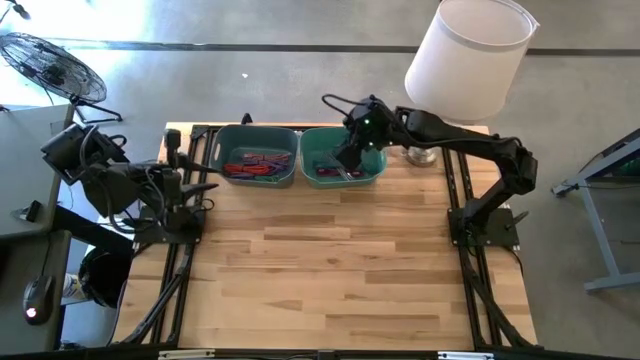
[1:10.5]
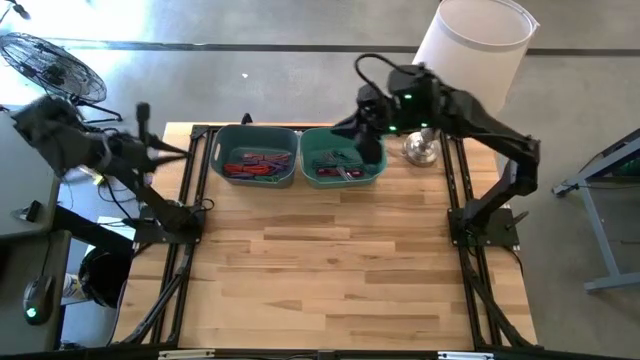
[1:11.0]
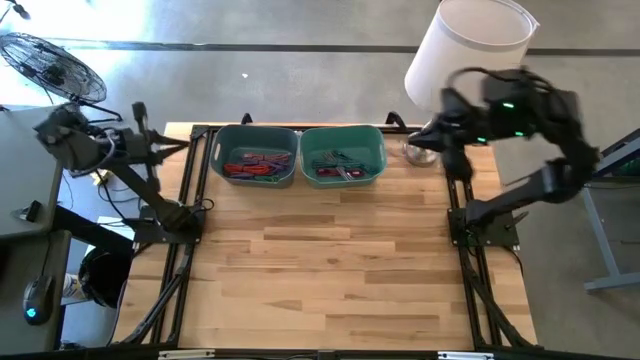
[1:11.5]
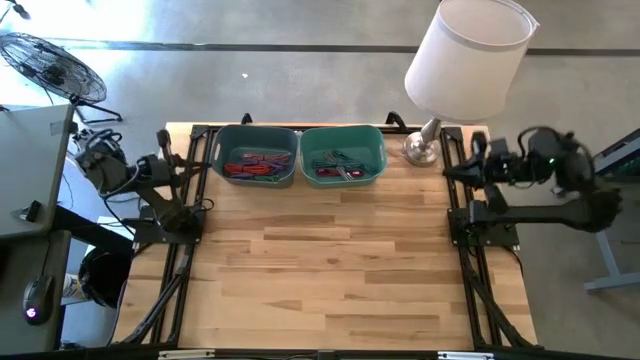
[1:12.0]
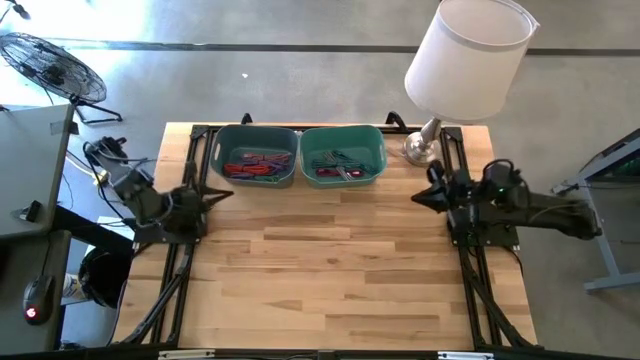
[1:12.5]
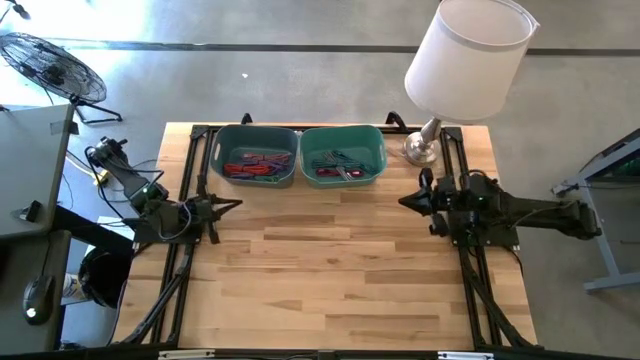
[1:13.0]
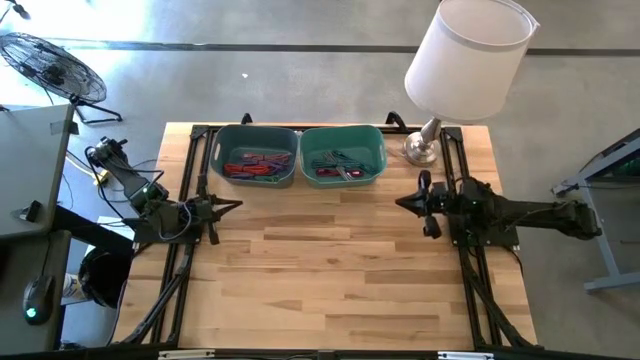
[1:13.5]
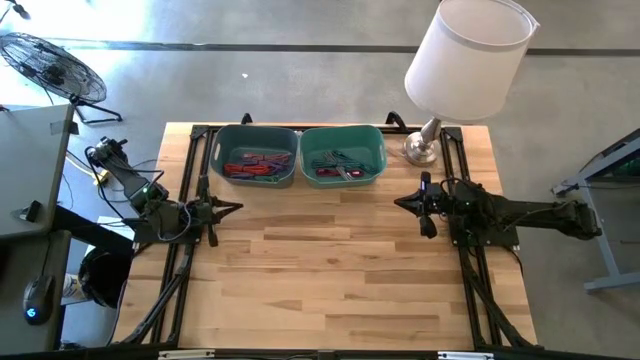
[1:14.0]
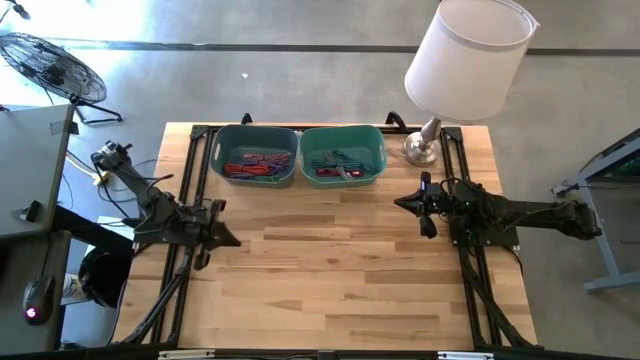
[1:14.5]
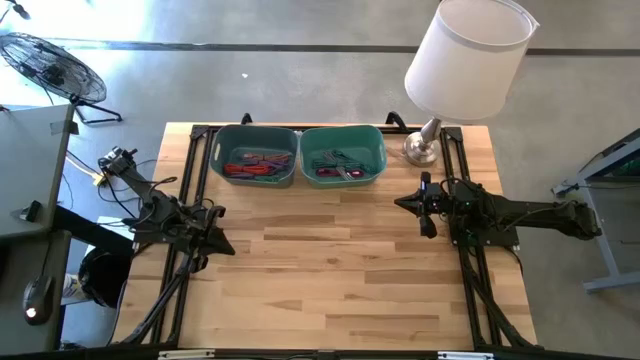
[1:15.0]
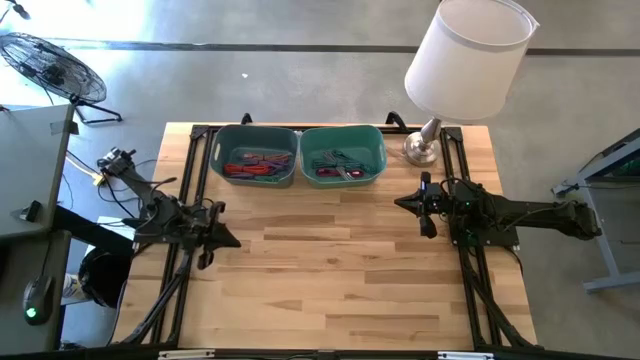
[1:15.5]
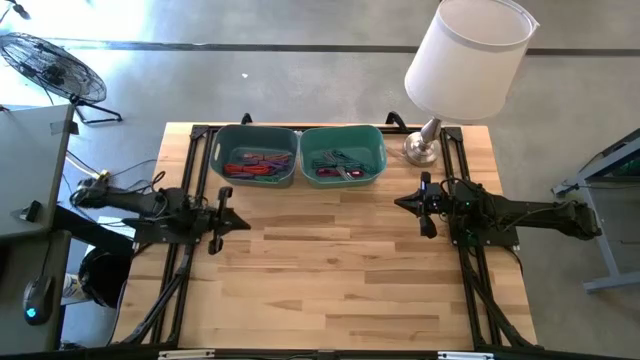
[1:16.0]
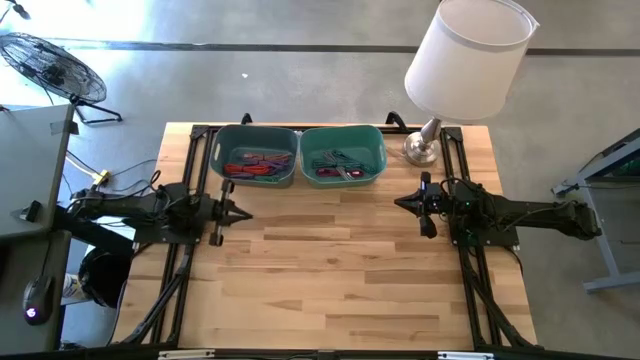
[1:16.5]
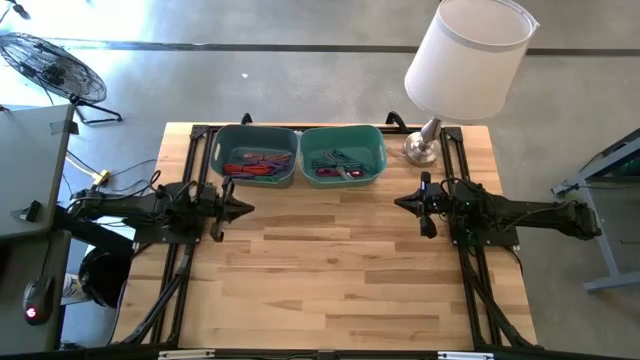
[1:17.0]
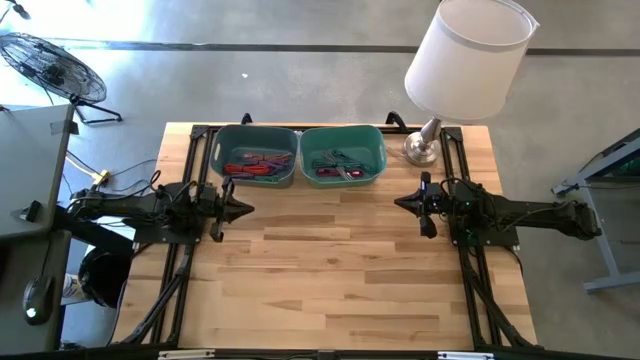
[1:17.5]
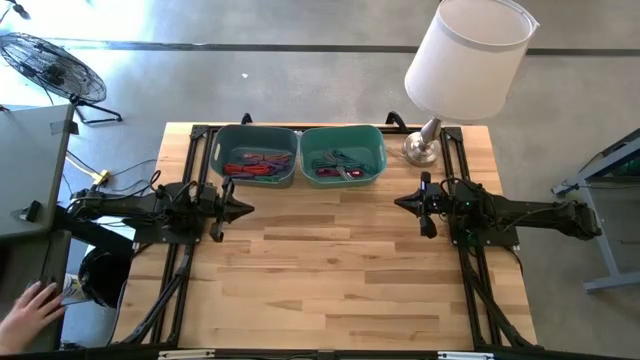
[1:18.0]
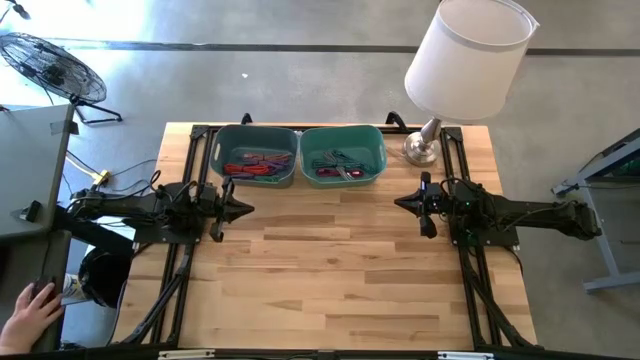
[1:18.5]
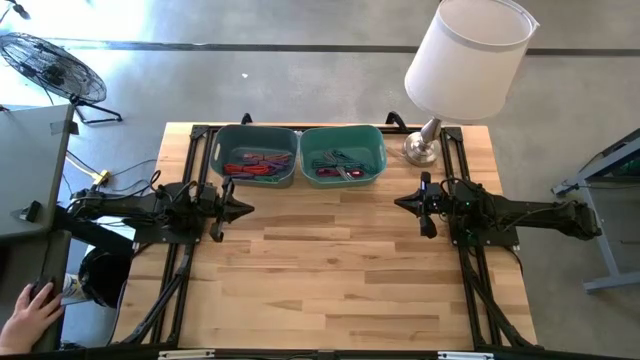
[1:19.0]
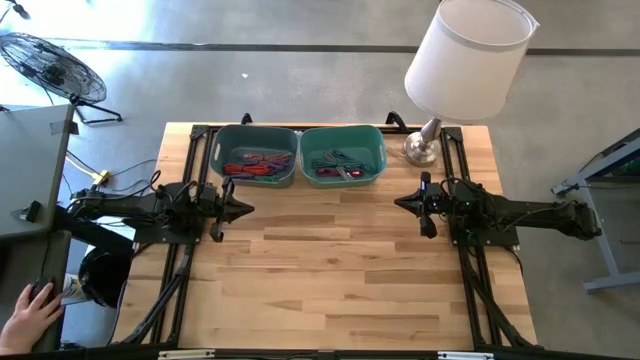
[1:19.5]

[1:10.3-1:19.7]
Task: Pick & Place USB Port
Return to Home Position

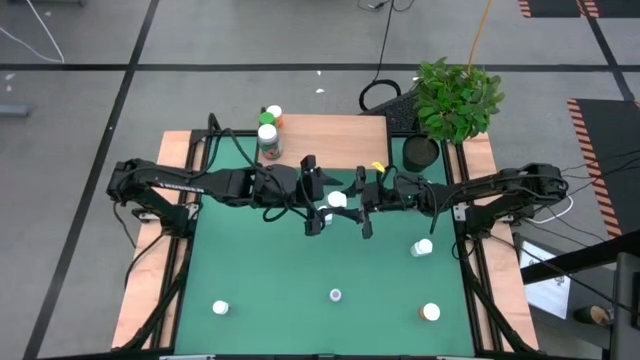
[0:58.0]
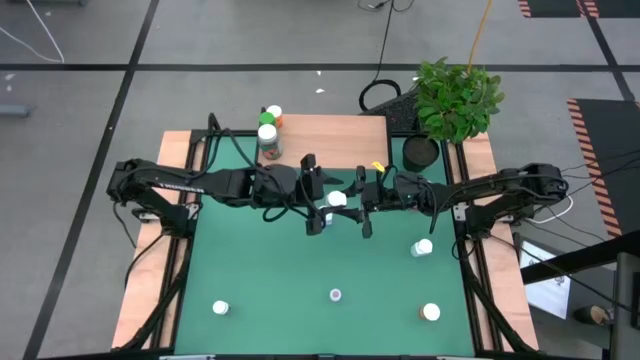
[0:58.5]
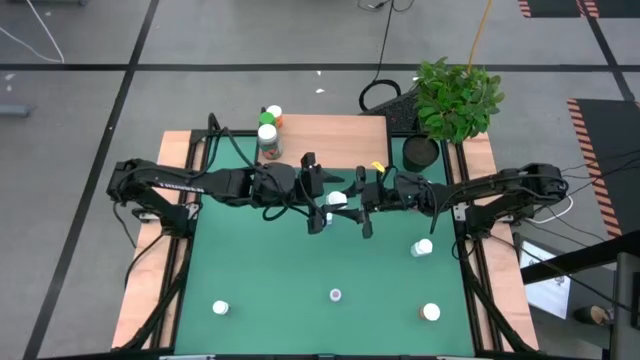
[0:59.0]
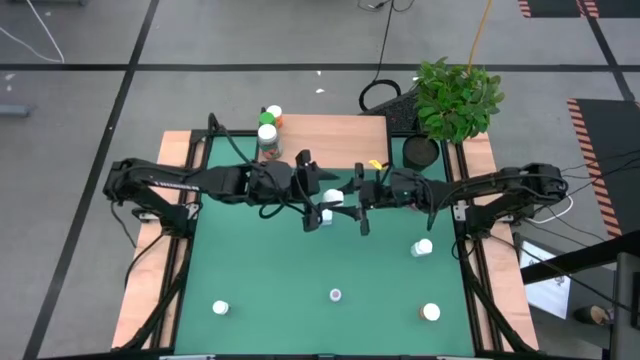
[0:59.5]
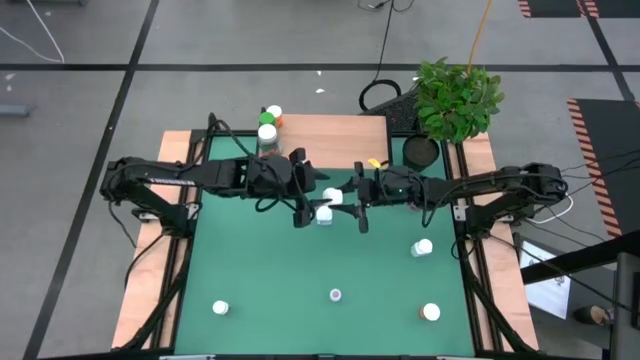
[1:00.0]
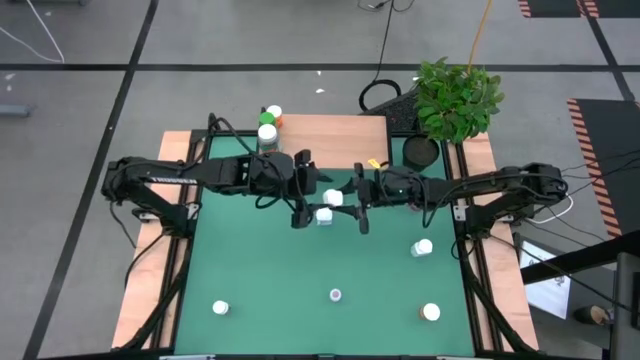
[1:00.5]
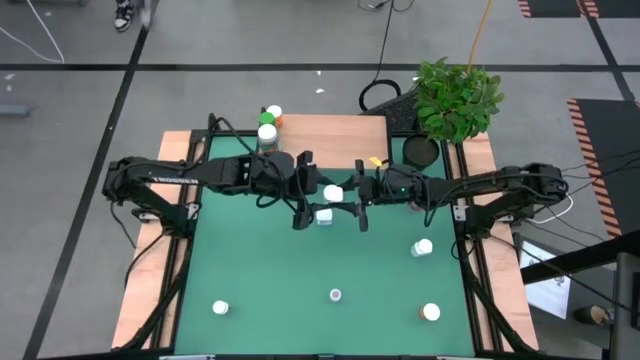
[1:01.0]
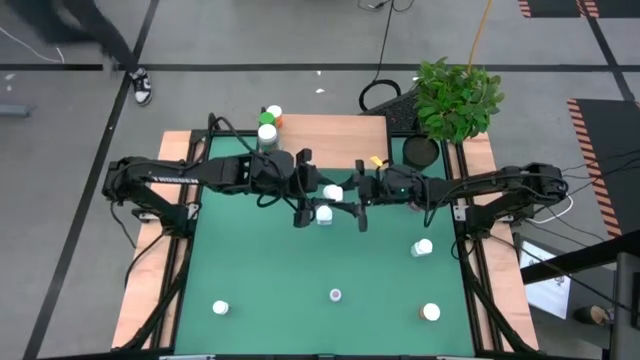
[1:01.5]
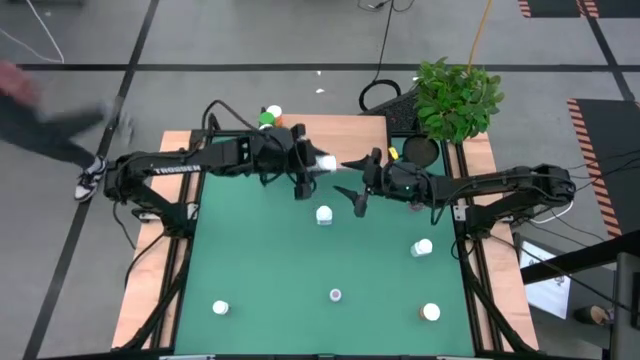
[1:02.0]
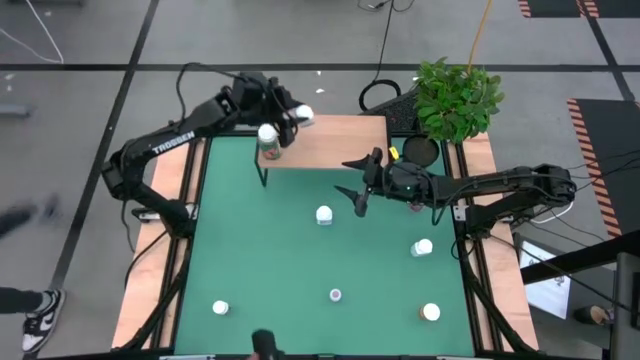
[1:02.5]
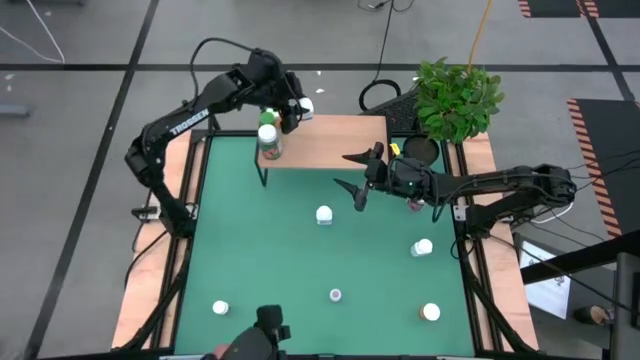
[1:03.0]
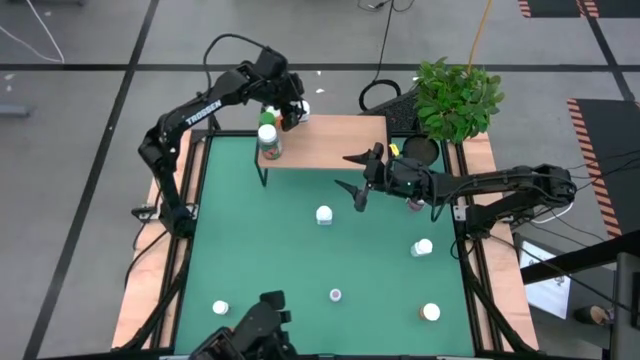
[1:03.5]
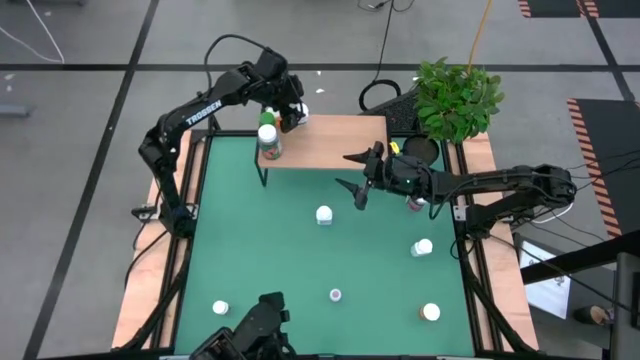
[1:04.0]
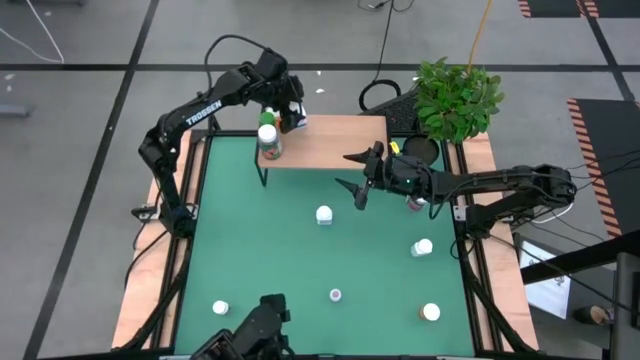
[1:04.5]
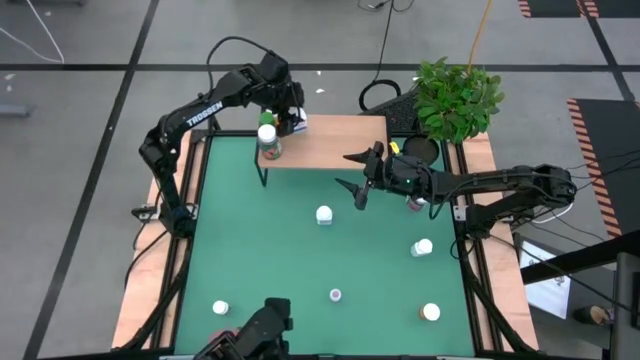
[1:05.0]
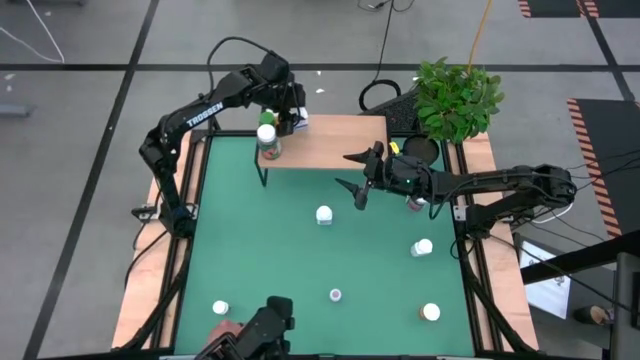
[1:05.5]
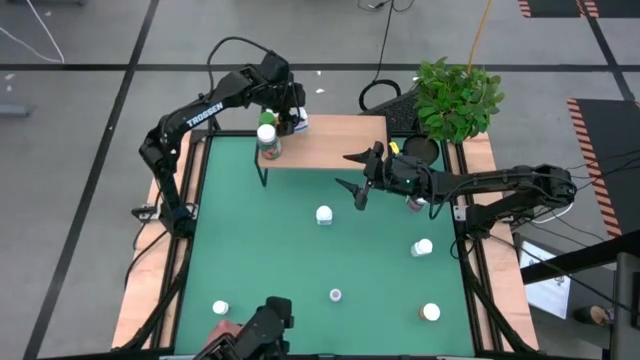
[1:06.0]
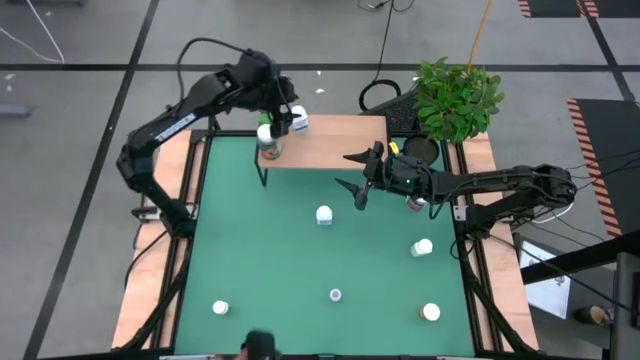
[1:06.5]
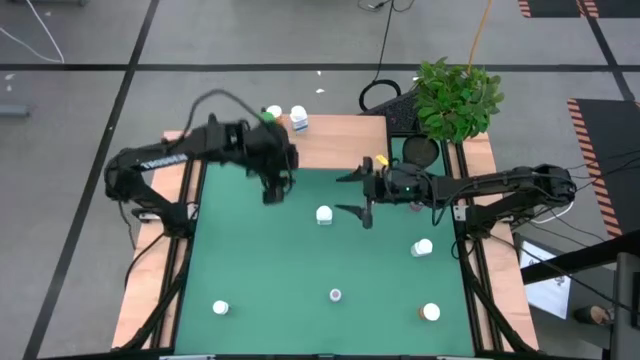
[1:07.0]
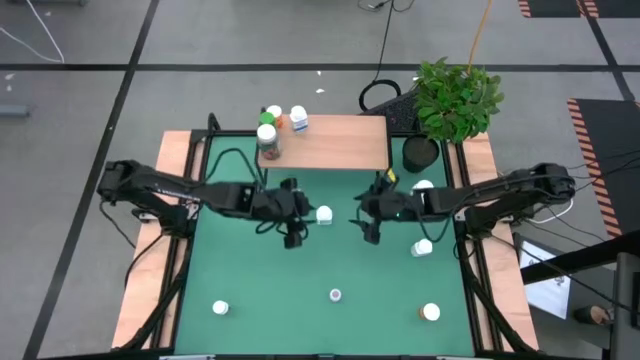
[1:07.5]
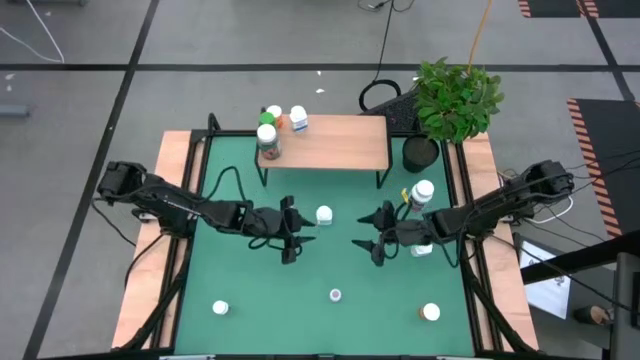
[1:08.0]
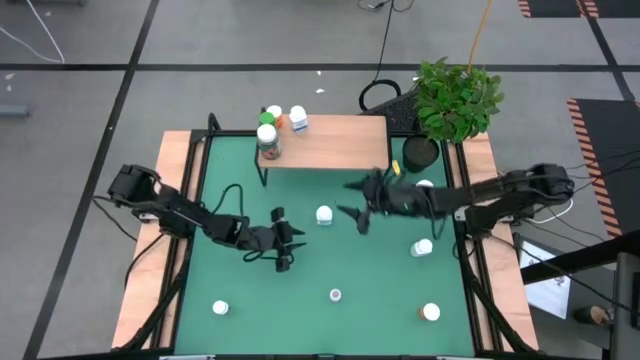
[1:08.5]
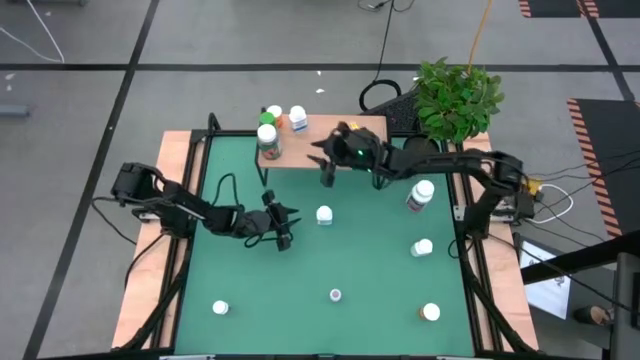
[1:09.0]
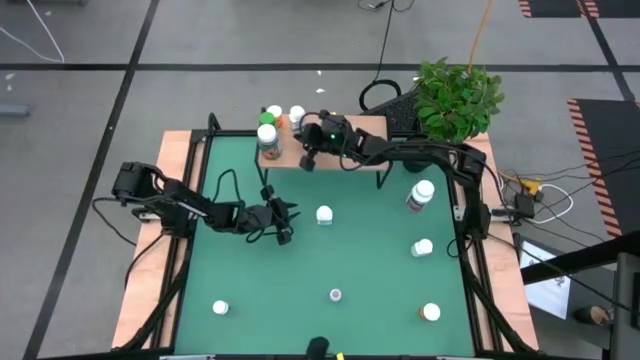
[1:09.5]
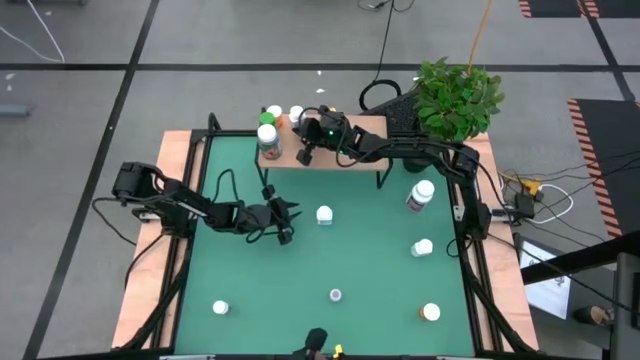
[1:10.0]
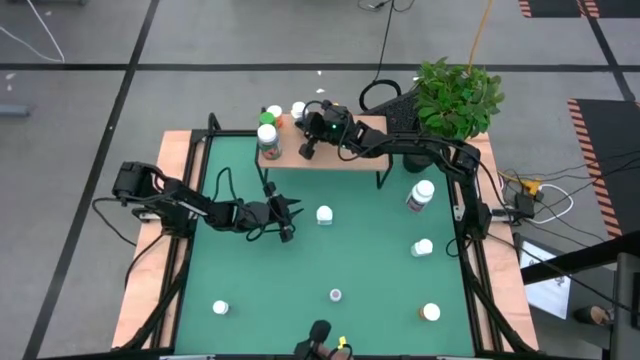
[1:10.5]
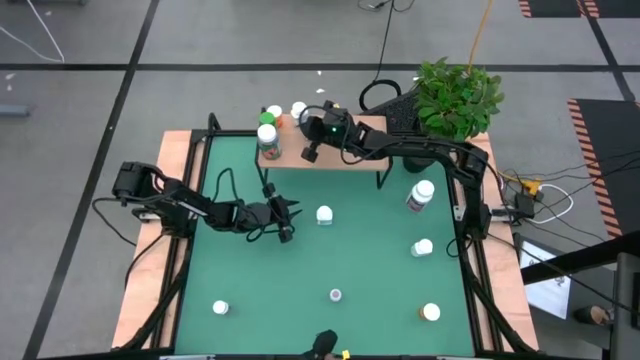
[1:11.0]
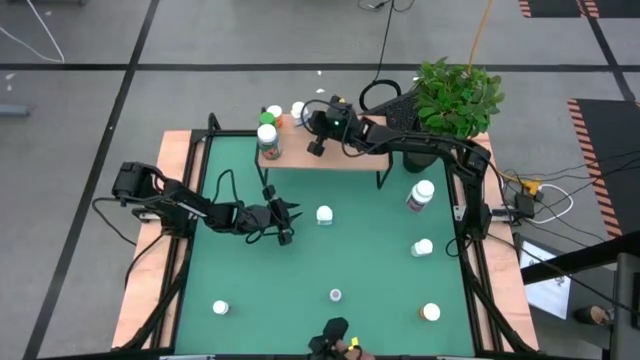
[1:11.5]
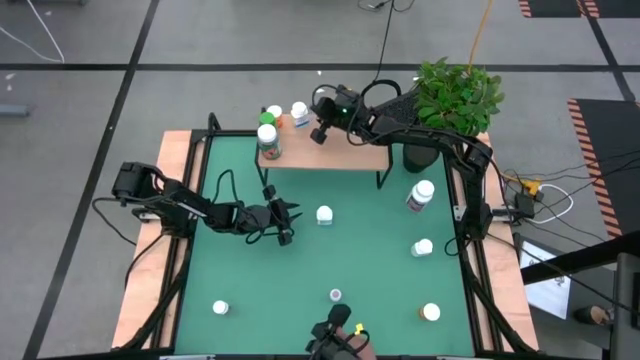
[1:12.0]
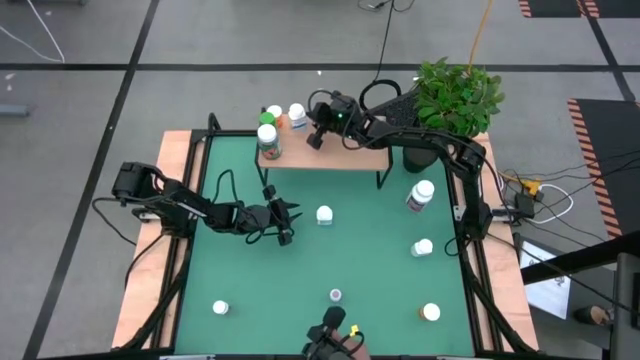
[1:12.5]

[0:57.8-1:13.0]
Task: Pick and place medicine bottles onto shelf by color
Put the bottom left blue bottle on the shelf
